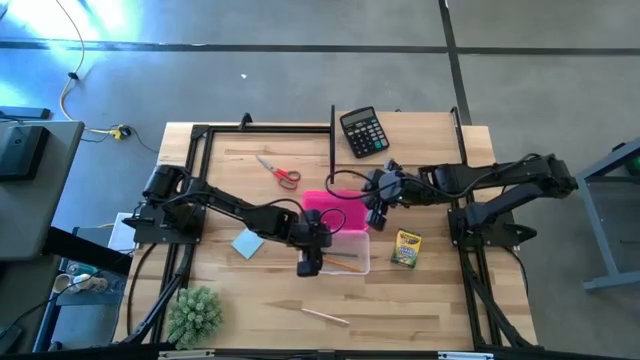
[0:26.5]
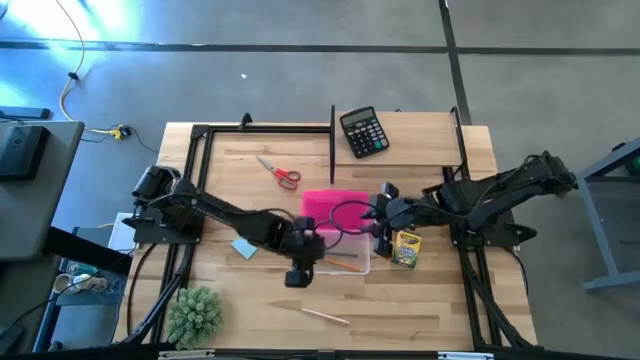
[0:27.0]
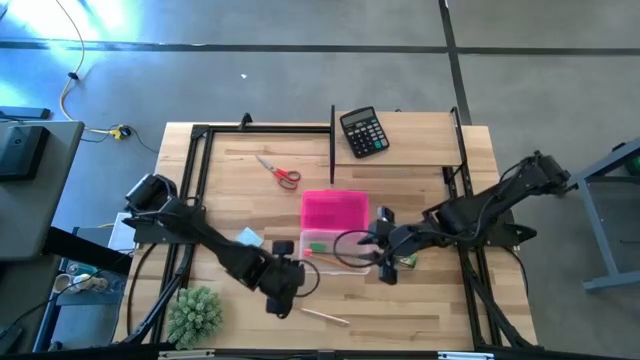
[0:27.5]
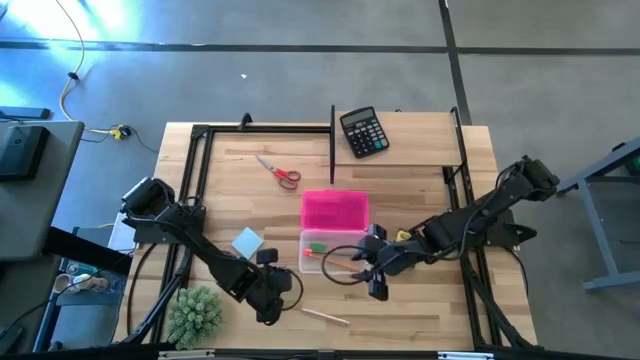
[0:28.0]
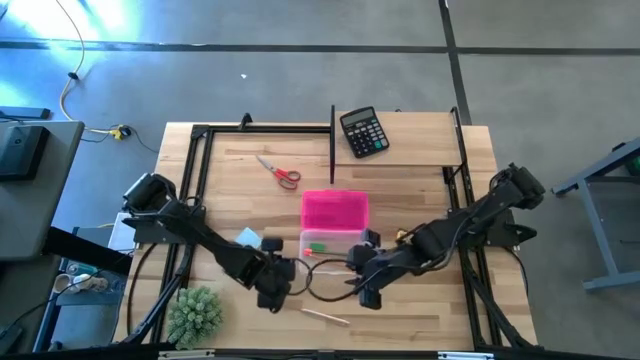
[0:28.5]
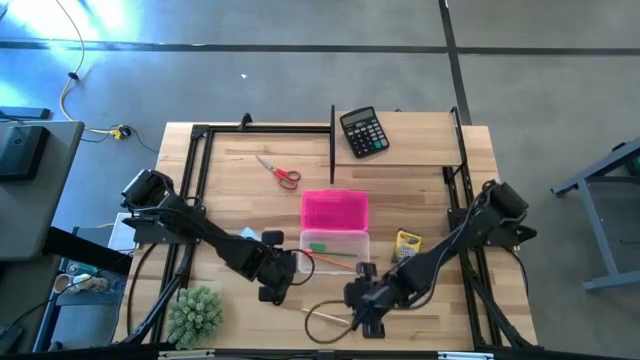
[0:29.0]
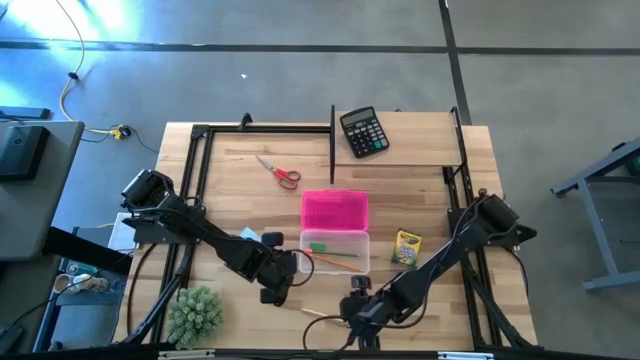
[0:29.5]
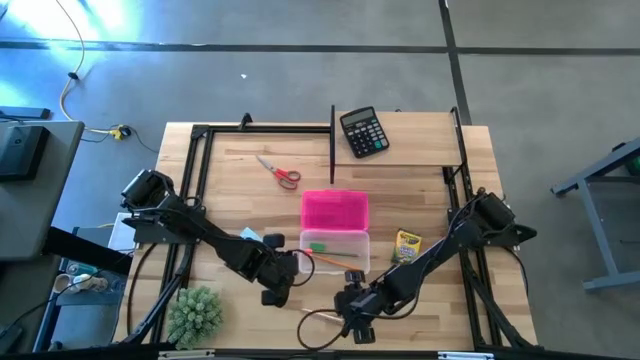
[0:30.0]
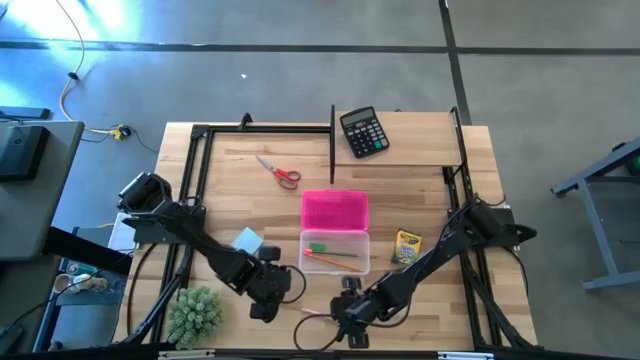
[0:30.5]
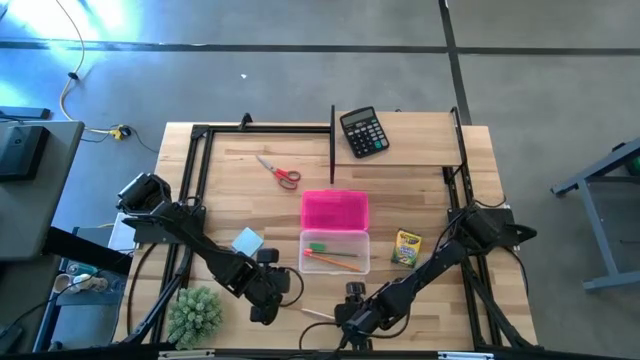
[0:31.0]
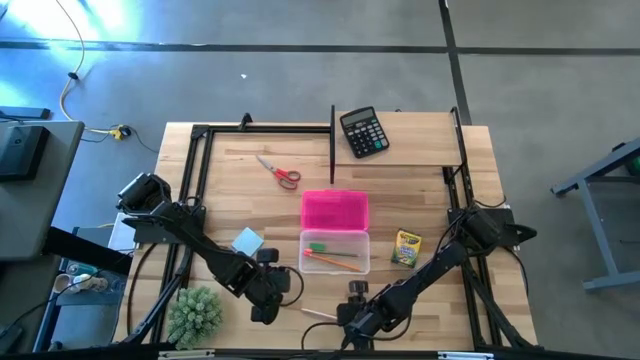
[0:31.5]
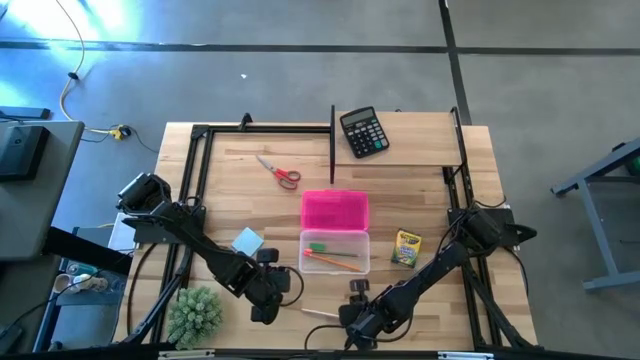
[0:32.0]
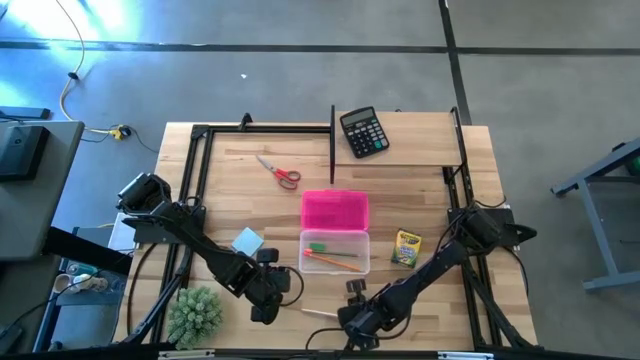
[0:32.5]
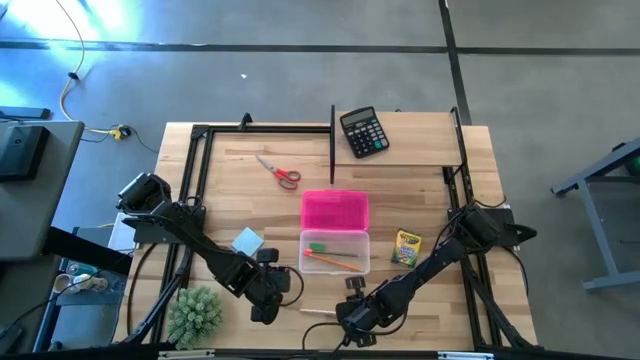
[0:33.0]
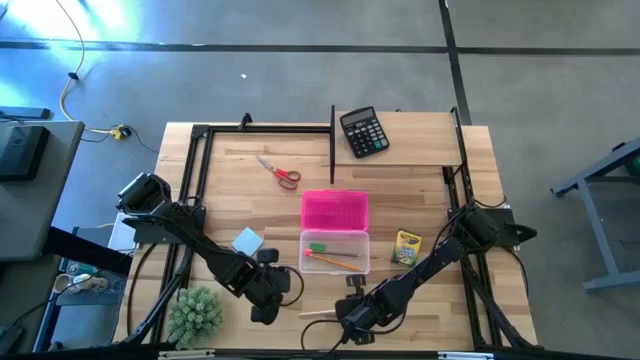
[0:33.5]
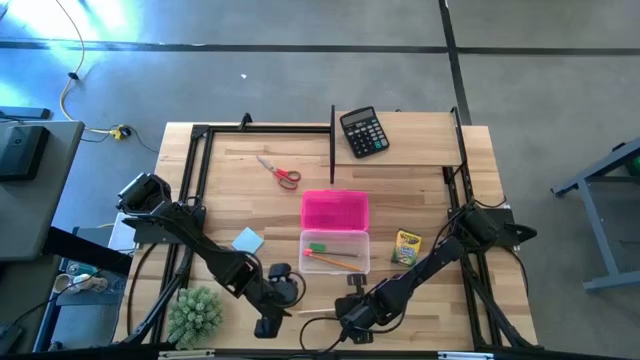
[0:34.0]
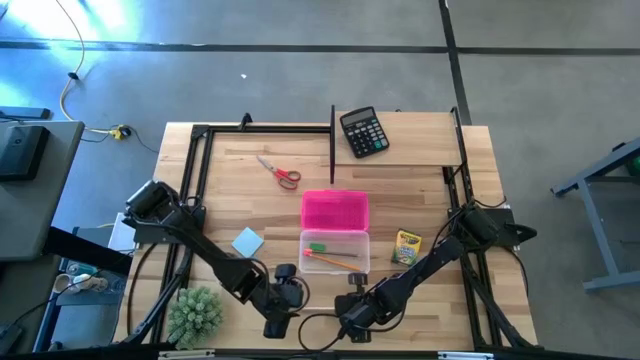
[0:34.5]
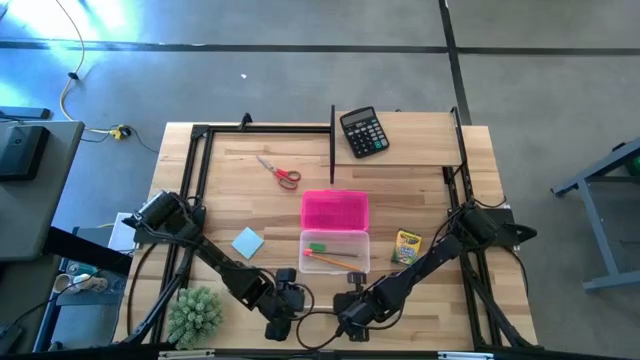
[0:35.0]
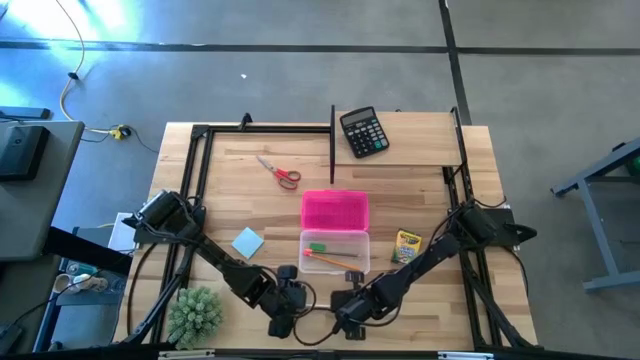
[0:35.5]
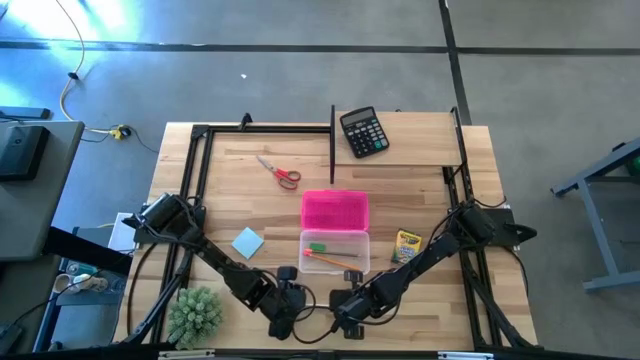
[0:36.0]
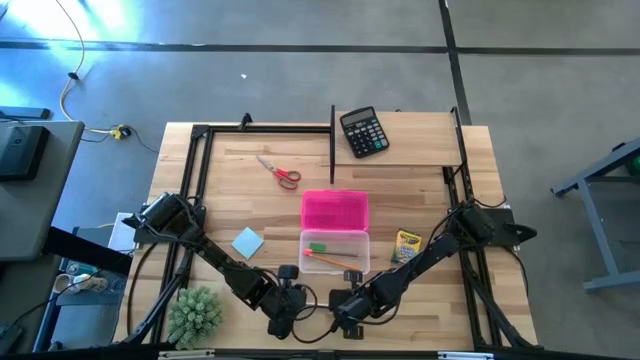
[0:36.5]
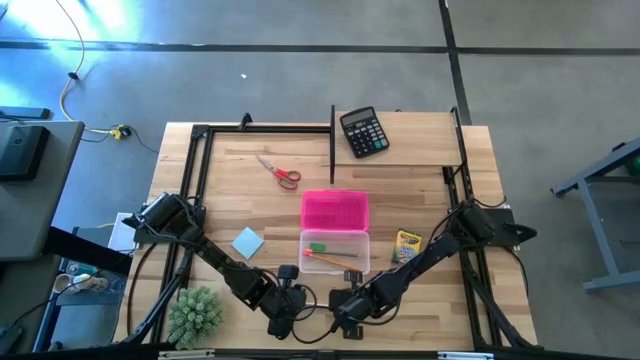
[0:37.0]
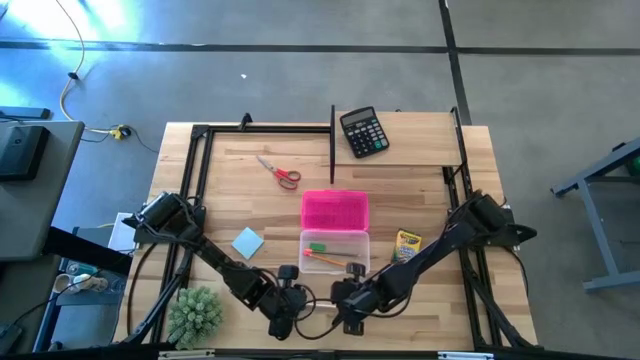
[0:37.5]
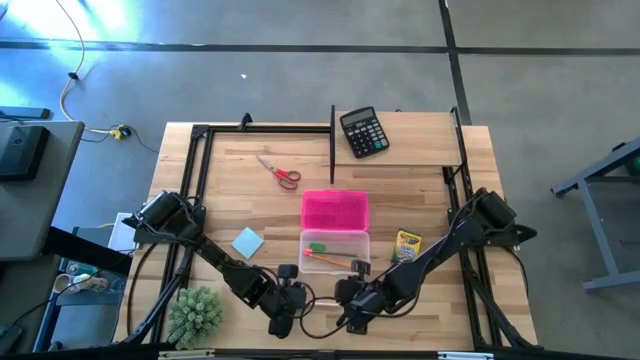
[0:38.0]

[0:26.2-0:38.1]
Task: Pack school essentials
Put the pink pen into the pink supply box

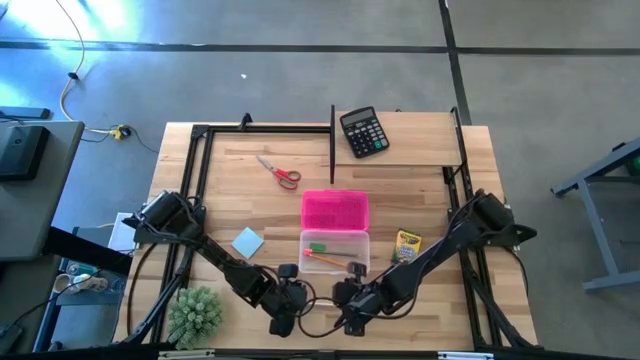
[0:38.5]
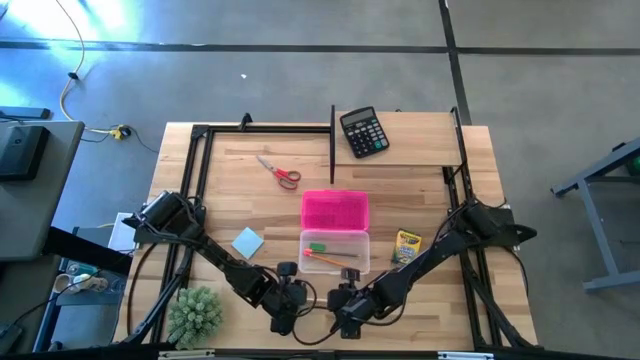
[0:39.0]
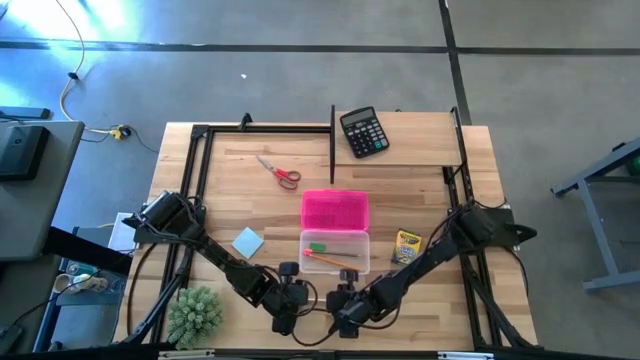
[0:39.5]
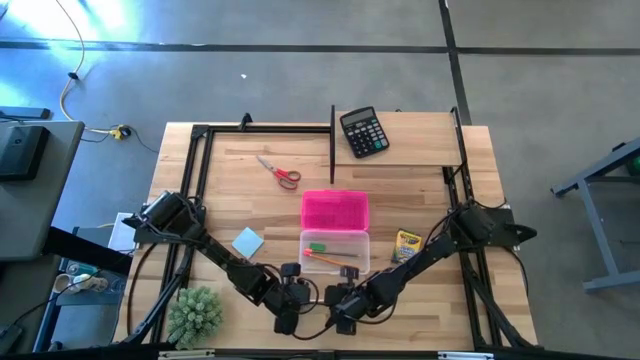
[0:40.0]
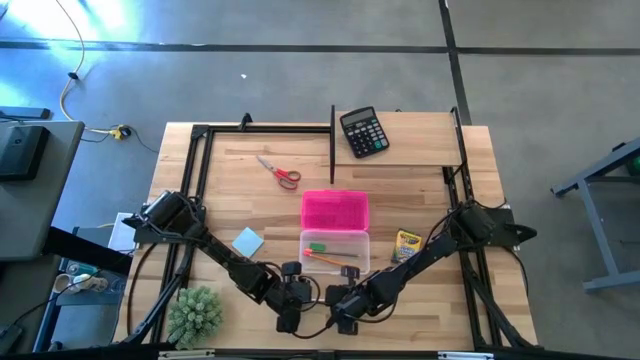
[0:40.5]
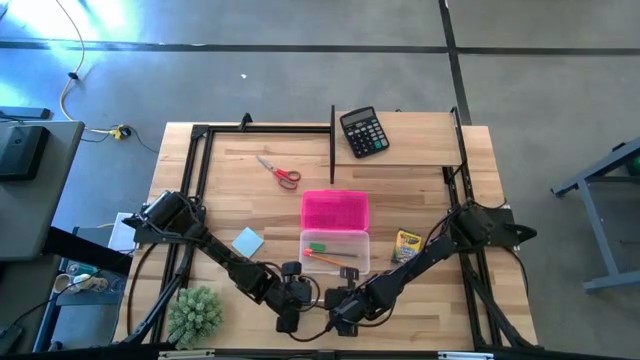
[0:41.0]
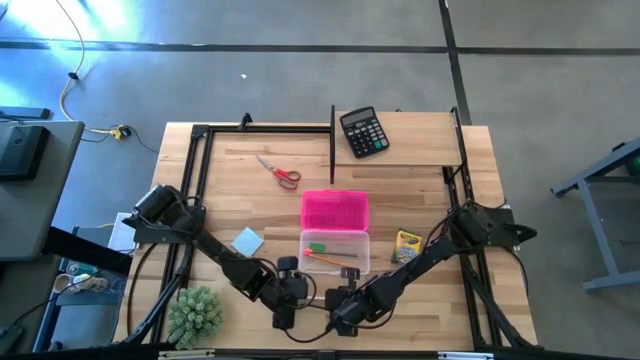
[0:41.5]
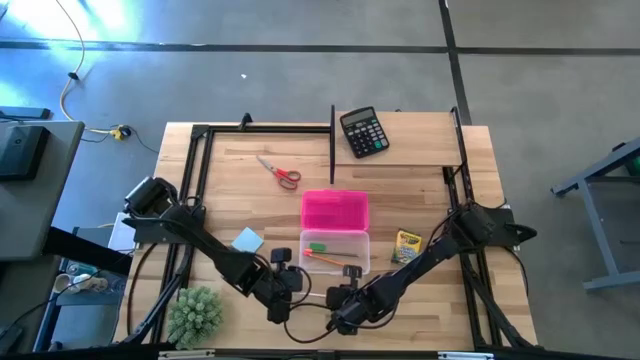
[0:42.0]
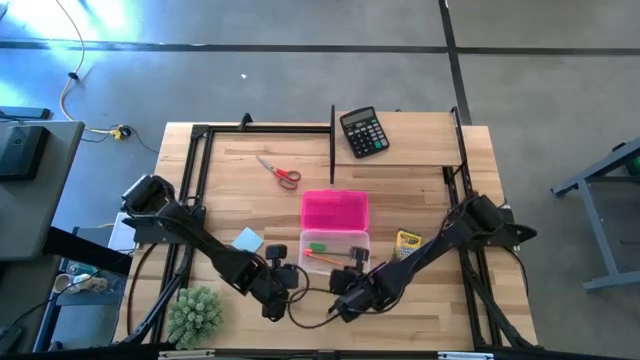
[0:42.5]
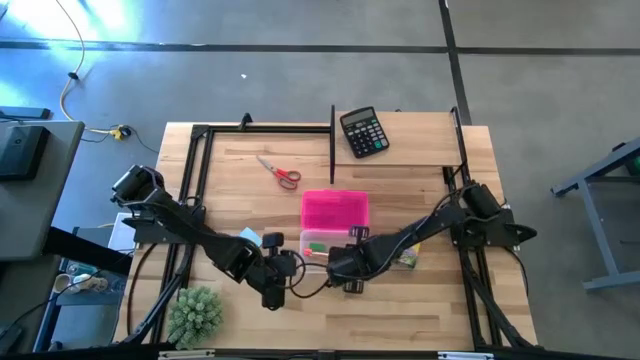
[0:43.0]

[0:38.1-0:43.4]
Put the pink pen into the pink supply box

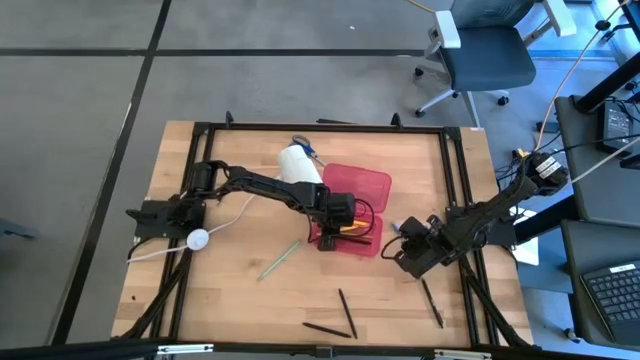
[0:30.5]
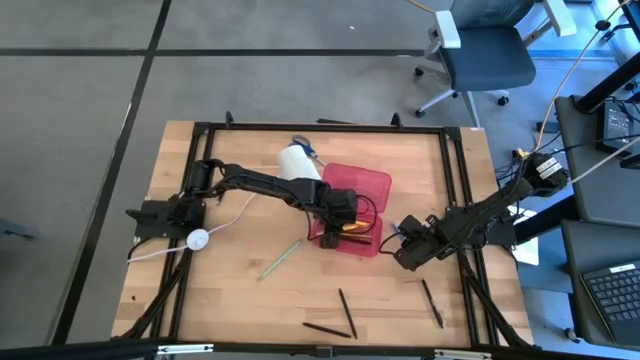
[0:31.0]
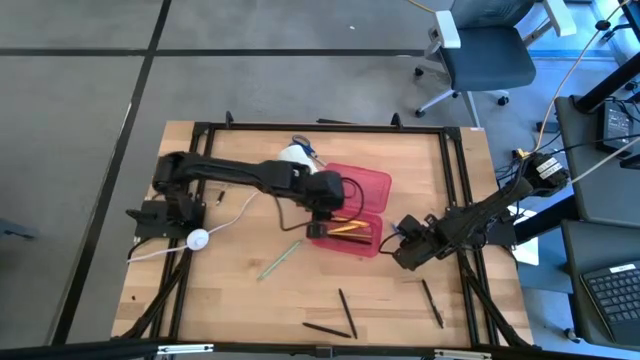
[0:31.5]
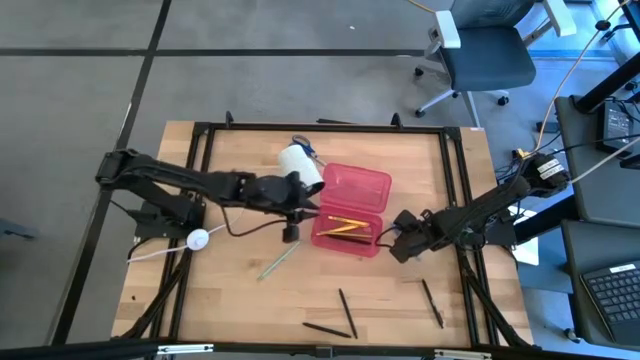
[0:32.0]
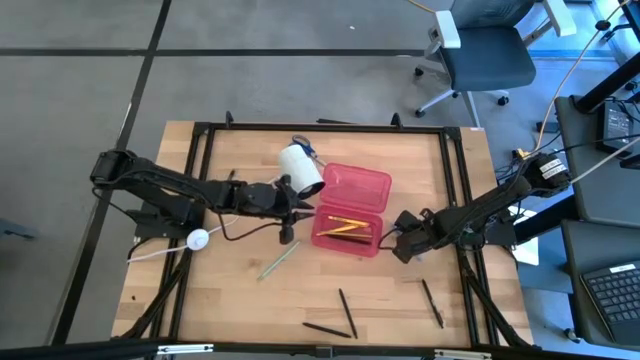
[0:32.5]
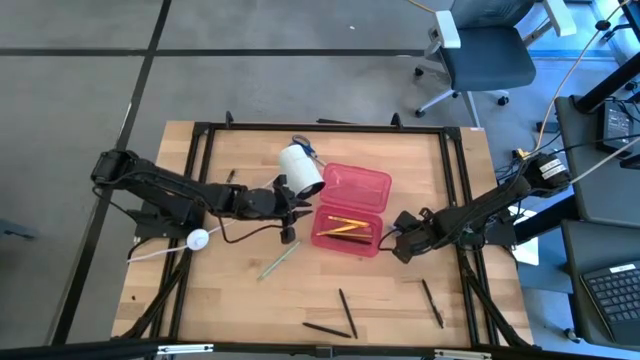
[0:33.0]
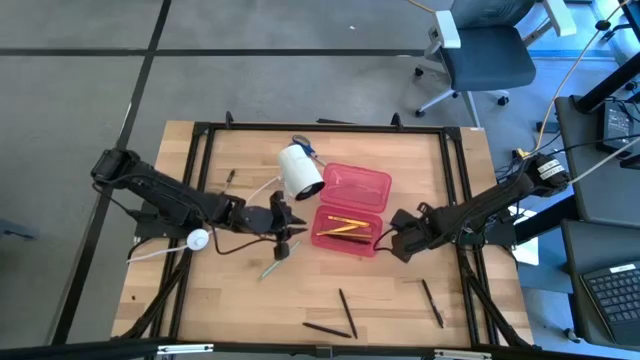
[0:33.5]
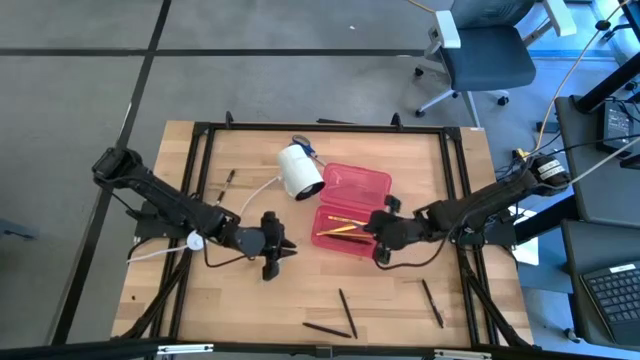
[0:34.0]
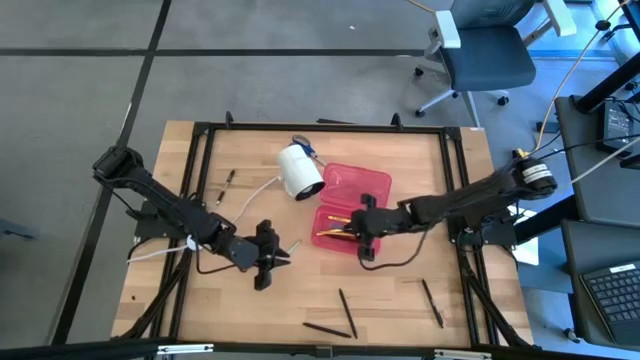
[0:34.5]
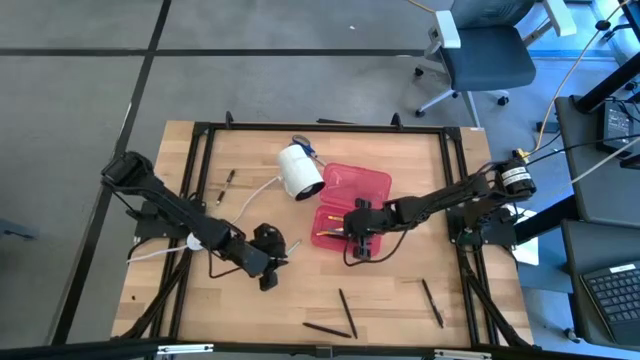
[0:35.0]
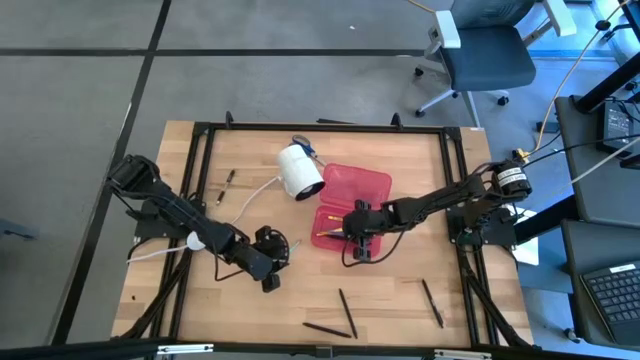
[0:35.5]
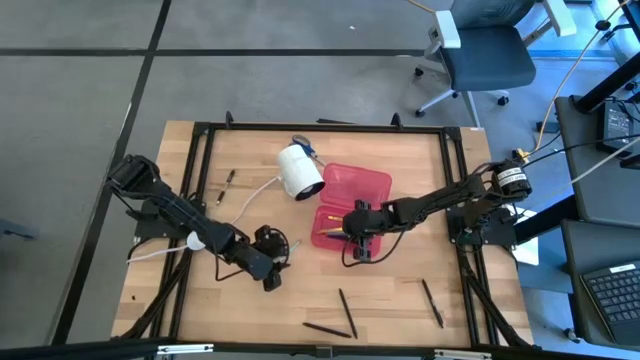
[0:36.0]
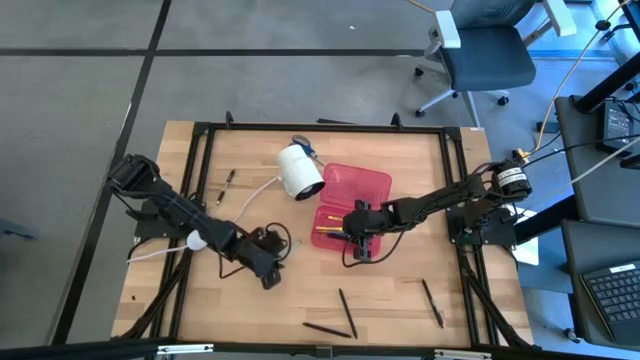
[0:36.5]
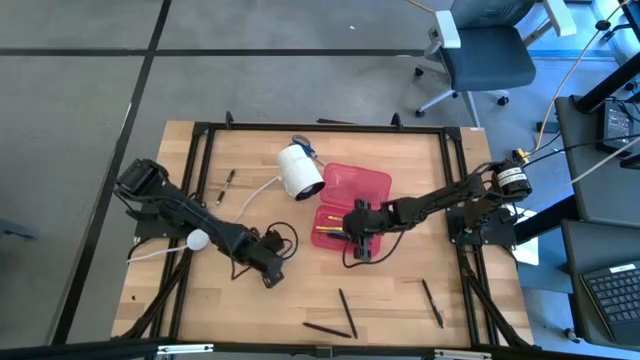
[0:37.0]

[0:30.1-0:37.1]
Task: Pick & place school supplies into a supply box
Put the blue pen into the pink supply box
